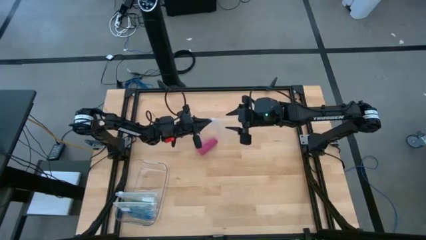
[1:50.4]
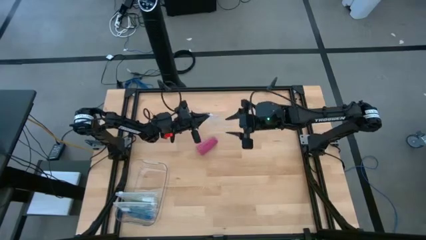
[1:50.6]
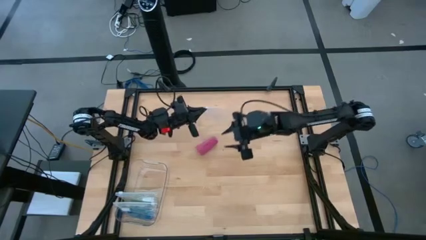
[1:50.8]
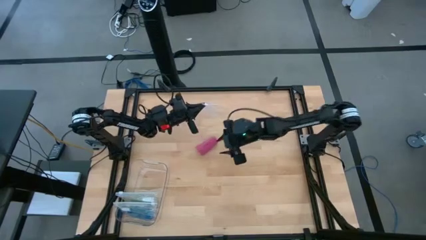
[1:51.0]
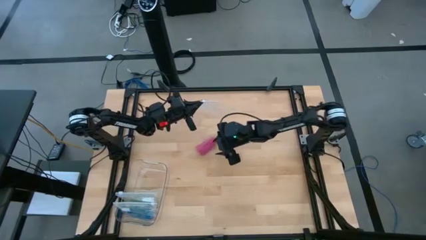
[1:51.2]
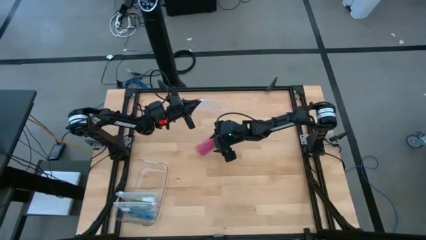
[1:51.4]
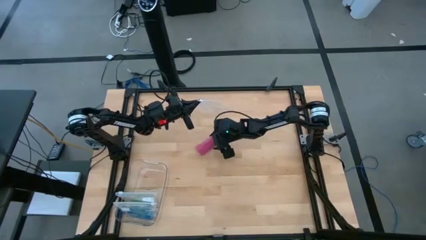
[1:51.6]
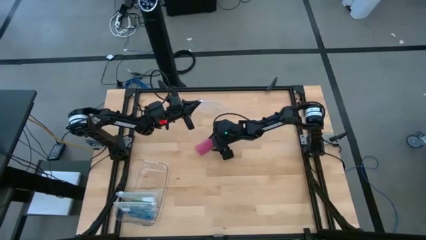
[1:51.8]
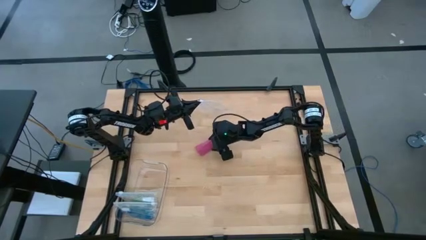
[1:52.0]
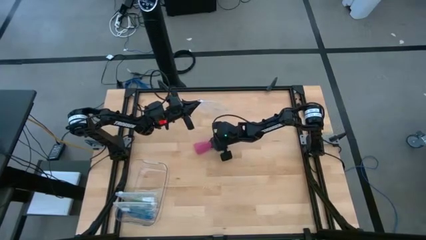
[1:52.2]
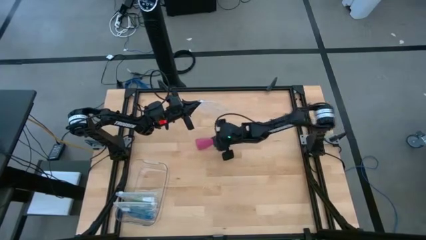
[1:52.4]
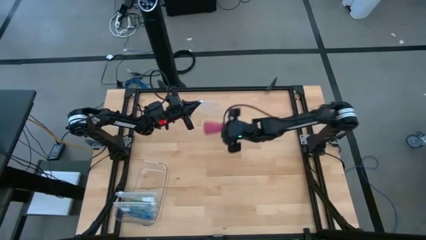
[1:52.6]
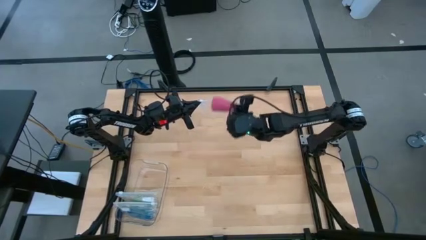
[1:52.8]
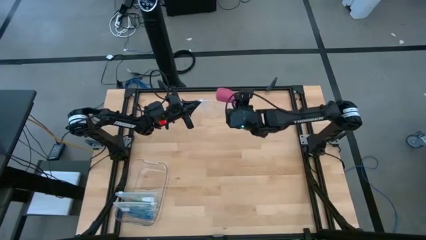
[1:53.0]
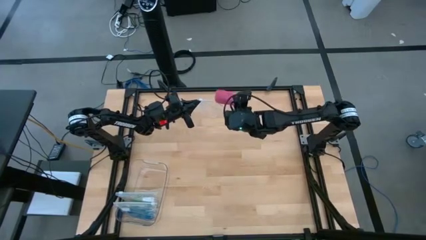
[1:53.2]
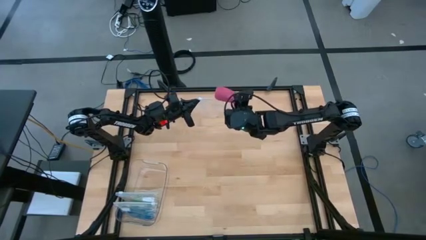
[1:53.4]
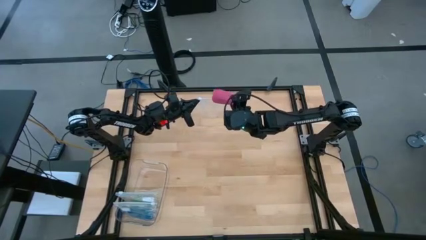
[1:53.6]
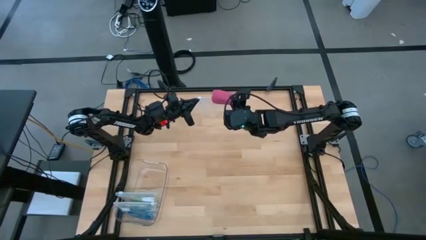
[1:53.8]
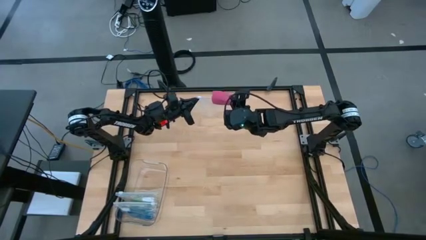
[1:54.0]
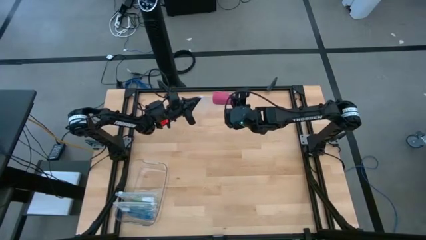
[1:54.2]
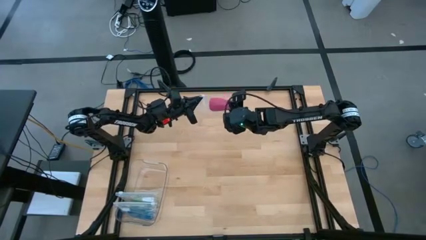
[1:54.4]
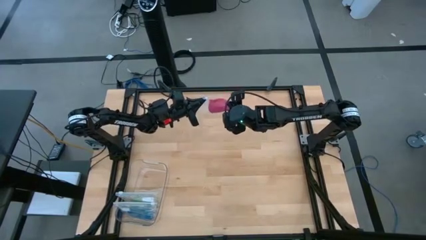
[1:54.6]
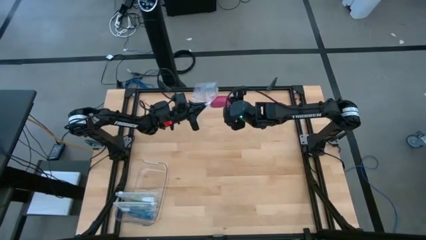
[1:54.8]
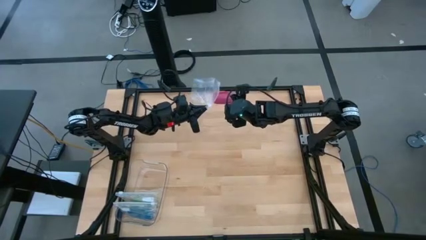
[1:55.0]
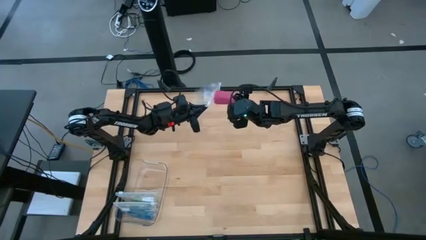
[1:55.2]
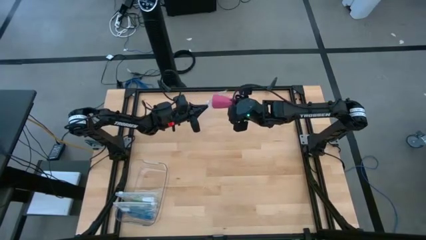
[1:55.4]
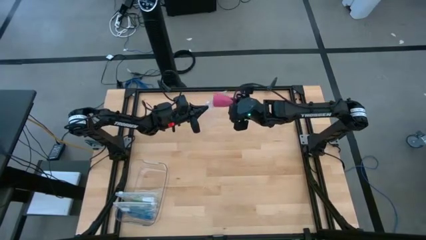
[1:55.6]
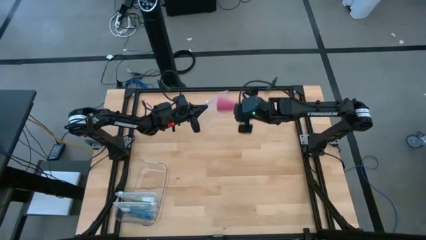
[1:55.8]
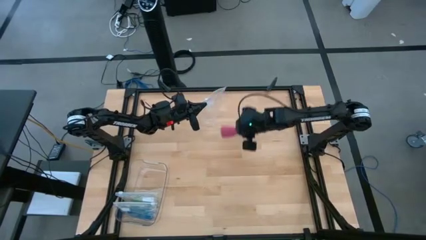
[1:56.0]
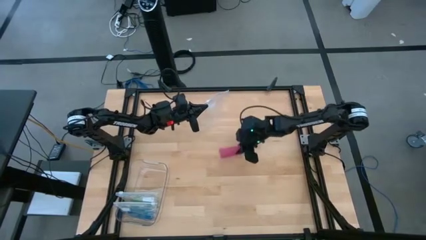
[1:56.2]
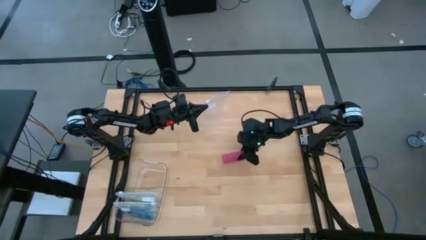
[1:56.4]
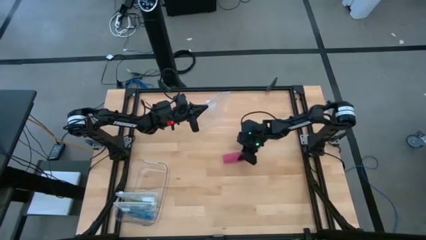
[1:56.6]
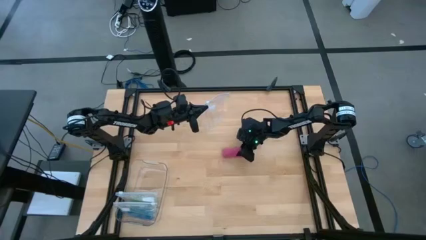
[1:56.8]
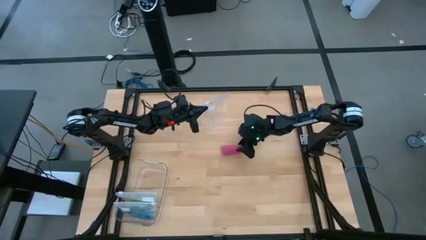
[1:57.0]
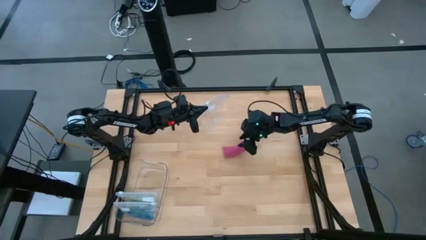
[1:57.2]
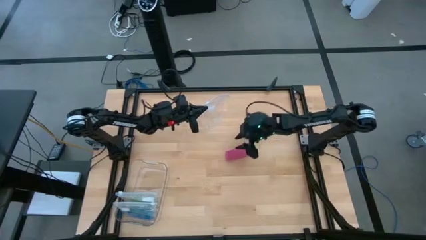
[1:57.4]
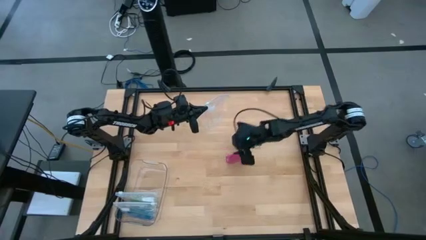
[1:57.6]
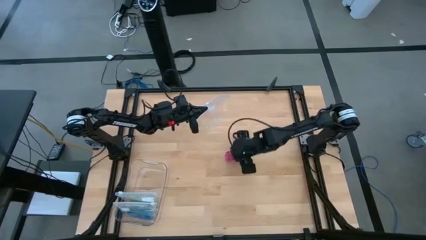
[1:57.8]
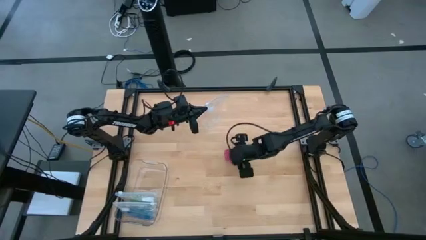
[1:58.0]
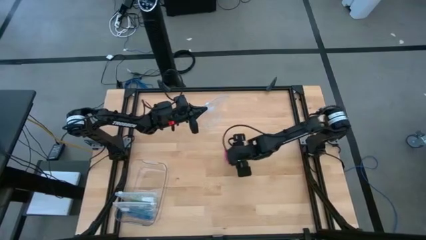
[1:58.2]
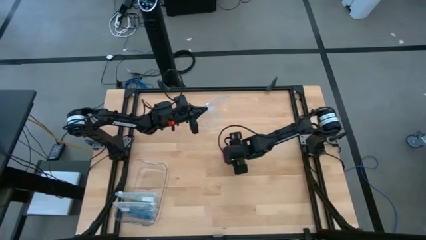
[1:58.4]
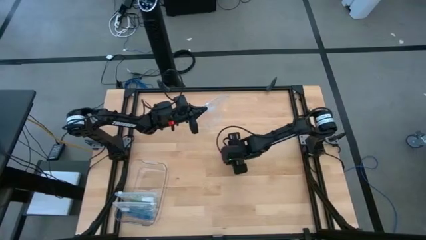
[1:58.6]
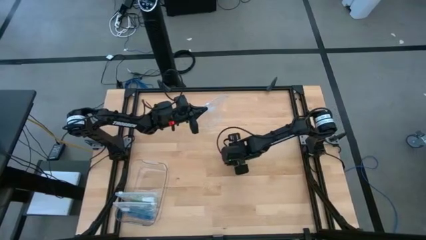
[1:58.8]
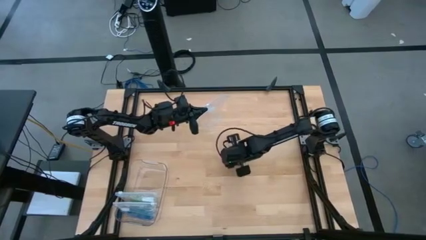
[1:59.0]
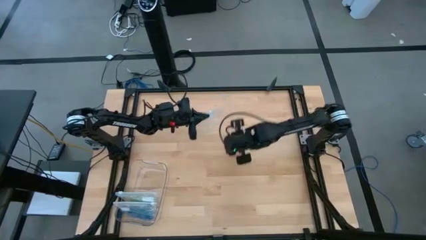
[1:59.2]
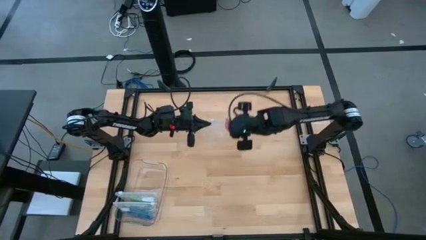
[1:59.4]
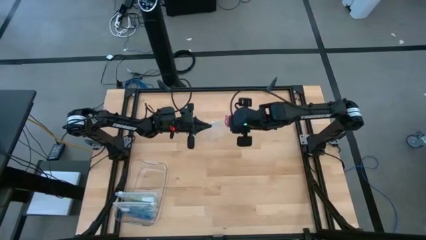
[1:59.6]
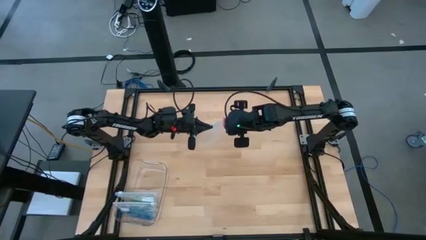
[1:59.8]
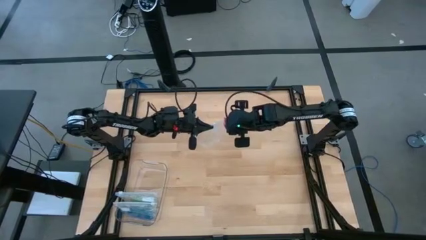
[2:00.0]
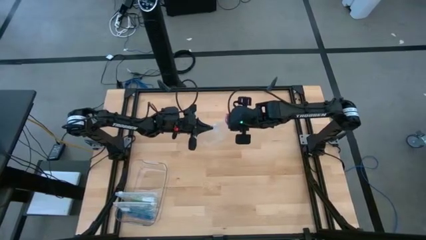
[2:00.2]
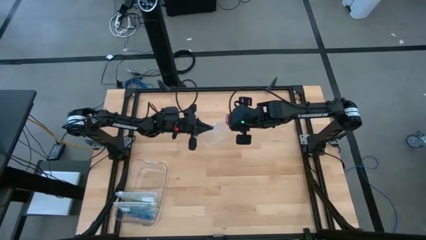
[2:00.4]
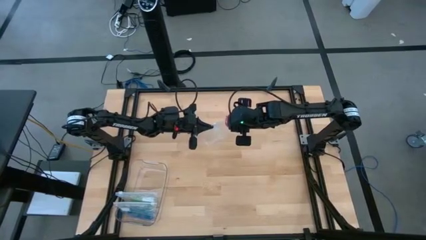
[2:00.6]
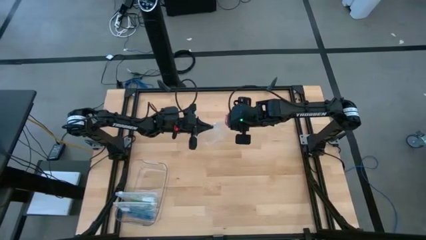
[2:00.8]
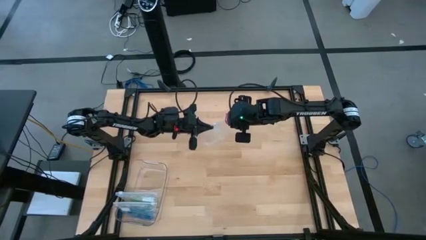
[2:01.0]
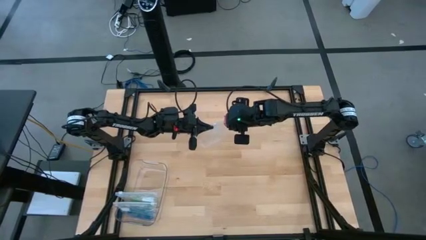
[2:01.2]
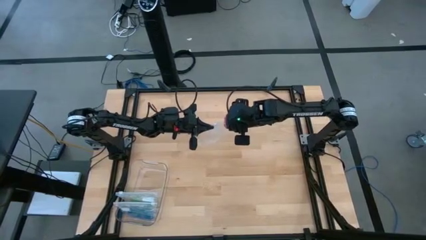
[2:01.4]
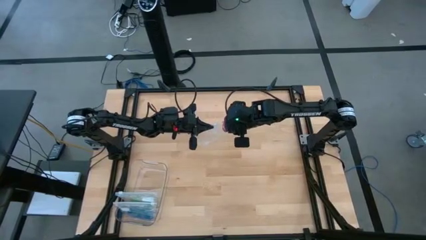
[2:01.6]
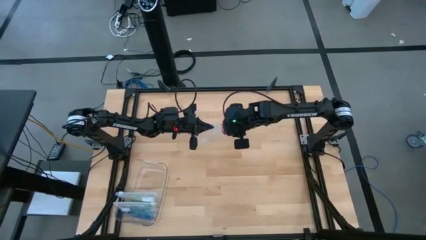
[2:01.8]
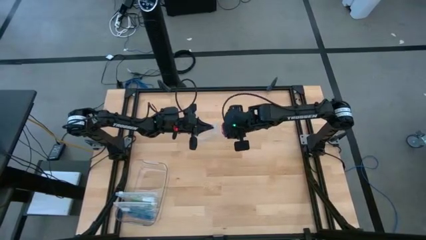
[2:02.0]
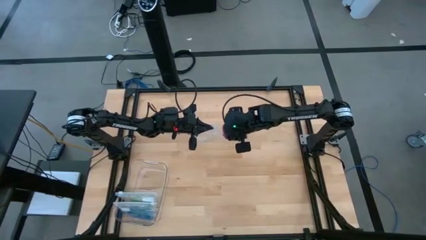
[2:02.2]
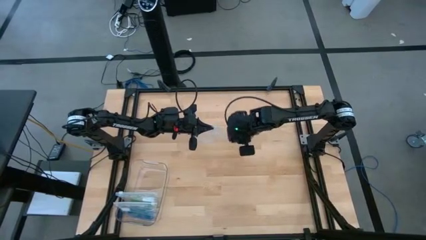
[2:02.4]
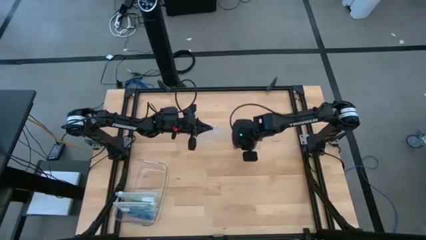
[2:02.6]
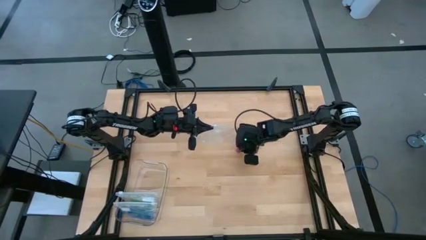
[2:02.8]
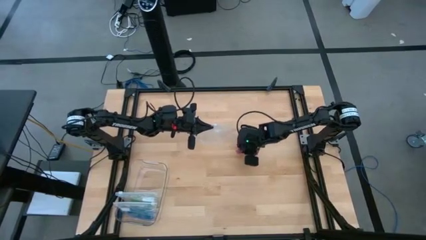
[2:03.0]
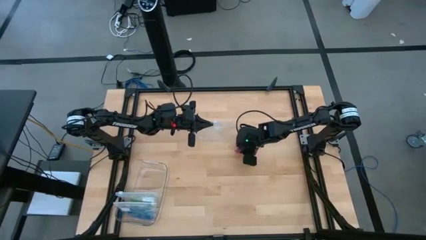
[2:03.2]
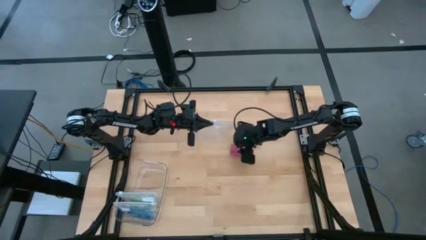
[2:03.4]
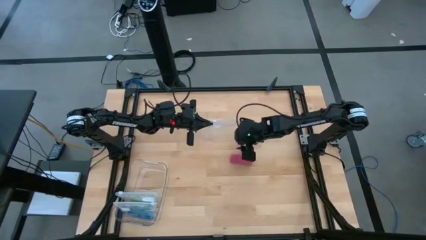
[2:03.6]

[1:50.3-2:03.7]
Task: Roll bandage
Put the rolled pink bandage into the transparent zip bag

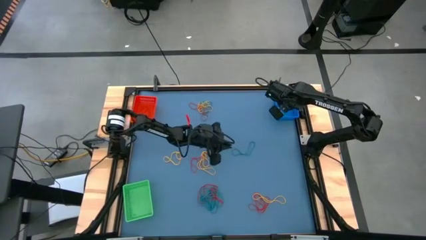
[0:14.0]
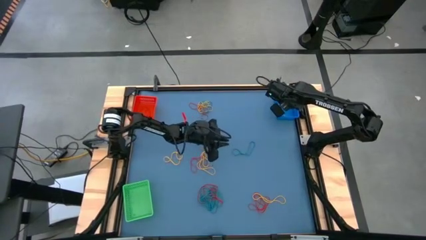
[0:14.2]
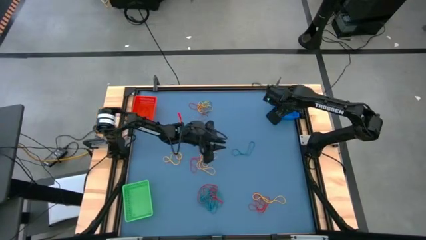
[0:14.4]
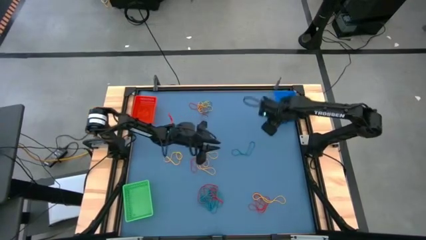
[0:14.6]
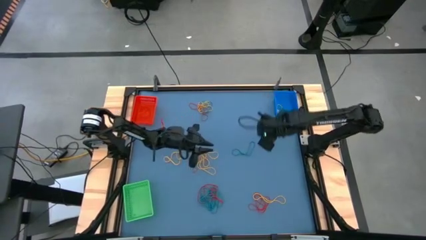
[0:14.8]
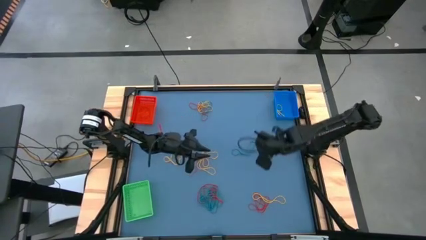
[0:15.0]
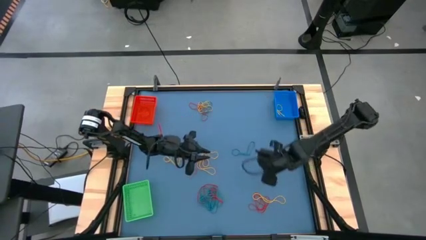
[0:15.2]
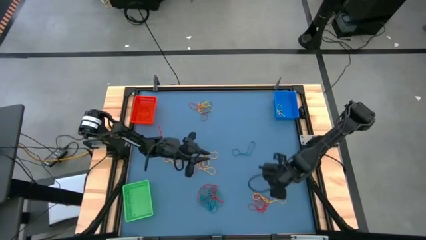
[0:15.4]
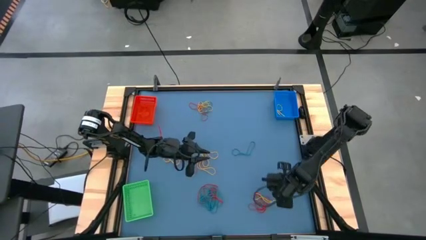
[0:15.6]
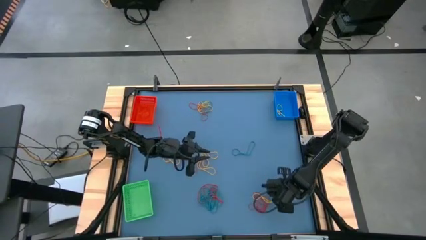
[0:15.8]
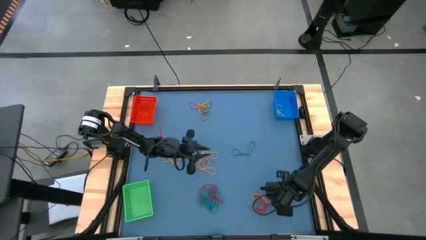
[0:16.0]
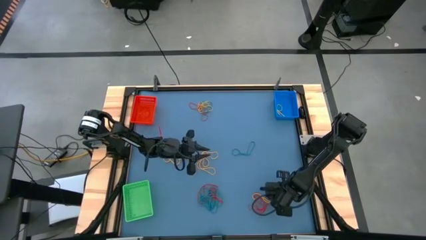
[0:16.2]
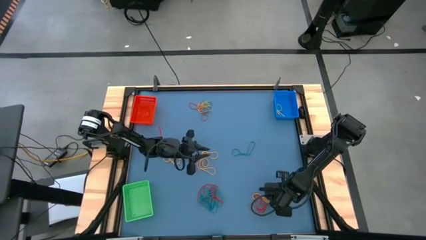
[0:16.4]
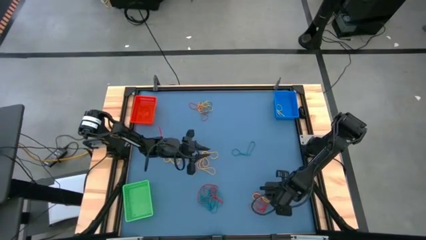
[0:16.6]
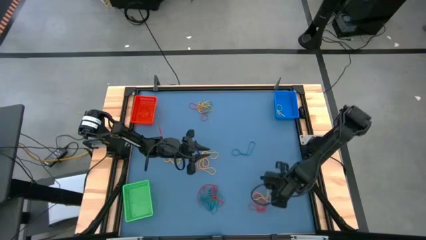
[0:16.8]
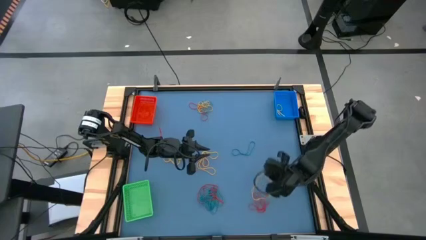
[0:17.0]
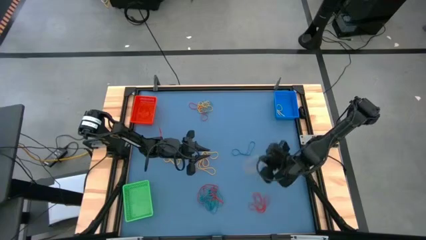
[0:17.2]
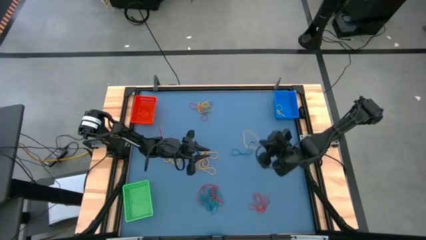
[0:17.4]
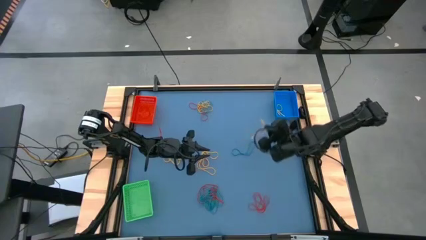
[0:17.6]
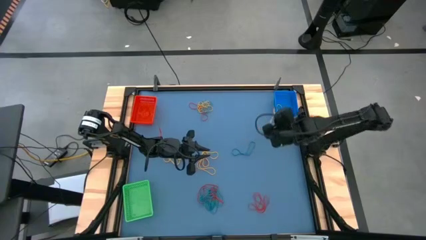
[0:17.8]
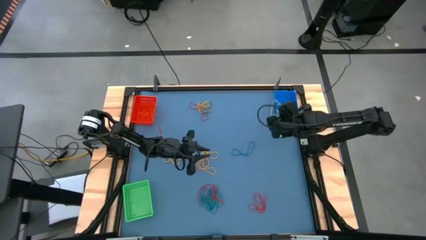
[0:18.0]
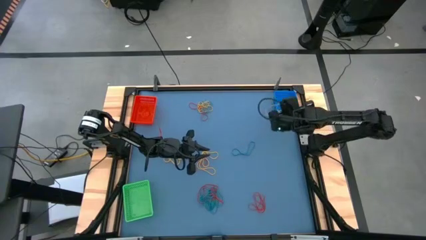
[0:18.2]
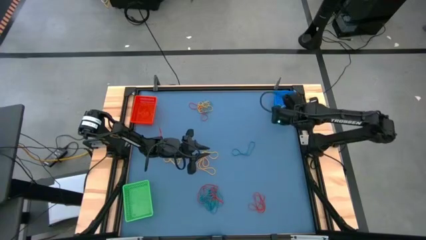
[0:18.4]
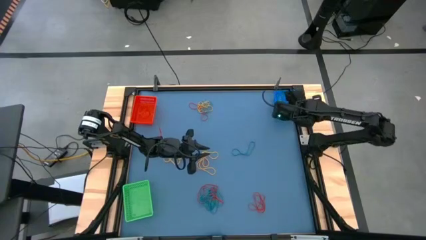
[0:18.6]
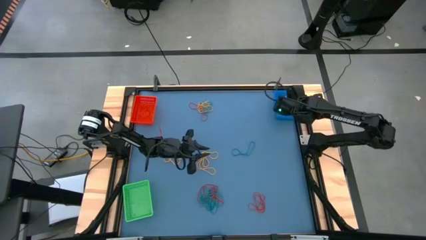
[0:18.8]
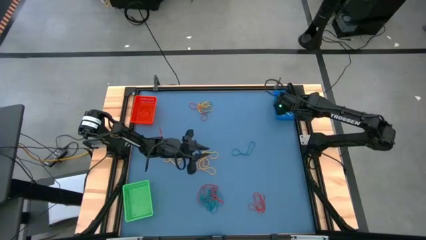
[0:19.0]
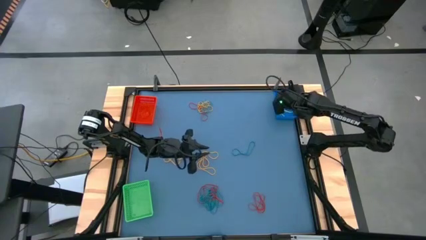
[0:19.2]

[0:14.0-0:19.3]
Task: Sort rubber bands into baskets
Put the yellow rubber band into the blue basket
